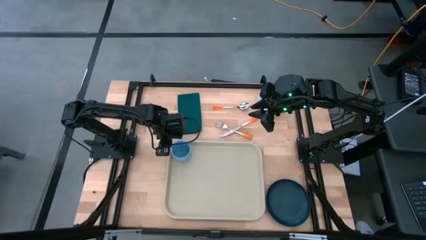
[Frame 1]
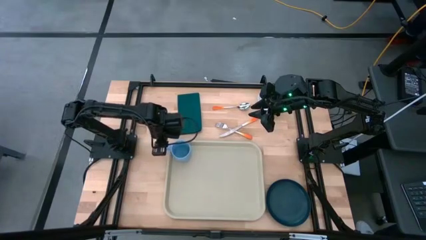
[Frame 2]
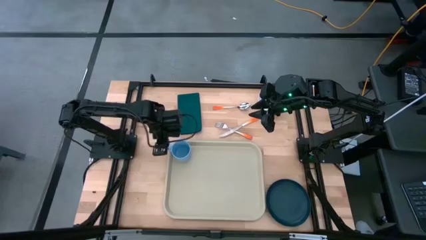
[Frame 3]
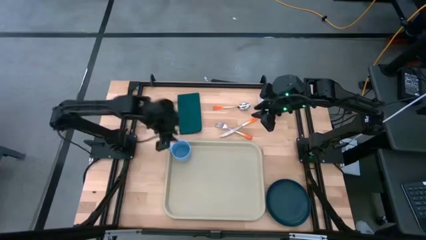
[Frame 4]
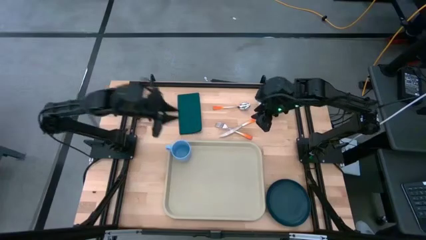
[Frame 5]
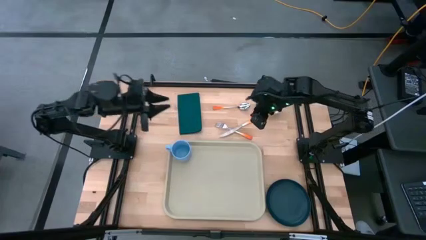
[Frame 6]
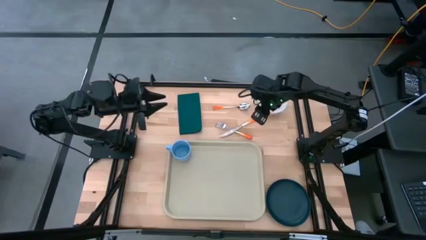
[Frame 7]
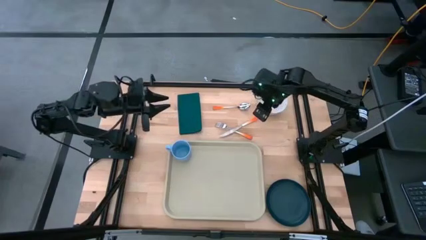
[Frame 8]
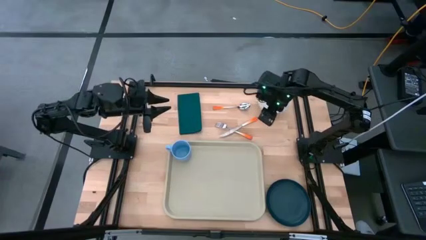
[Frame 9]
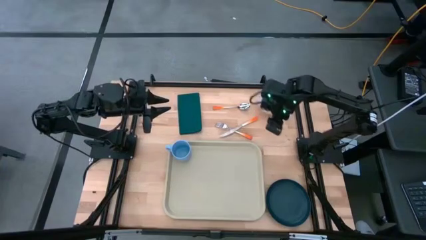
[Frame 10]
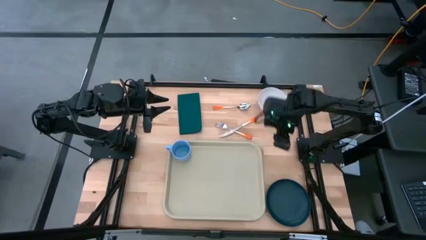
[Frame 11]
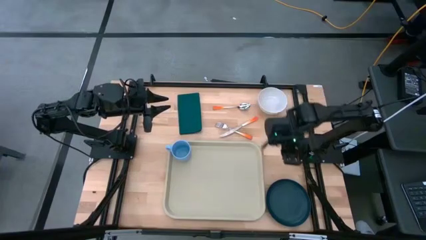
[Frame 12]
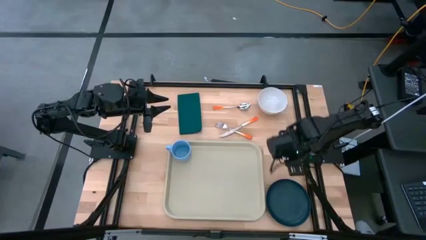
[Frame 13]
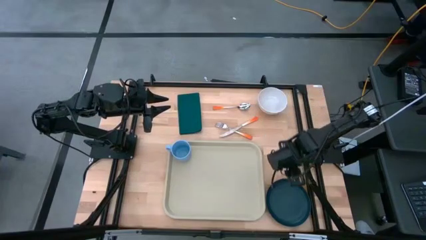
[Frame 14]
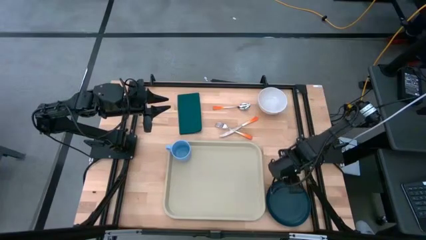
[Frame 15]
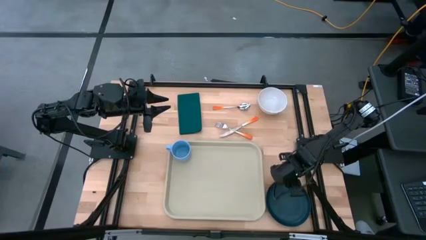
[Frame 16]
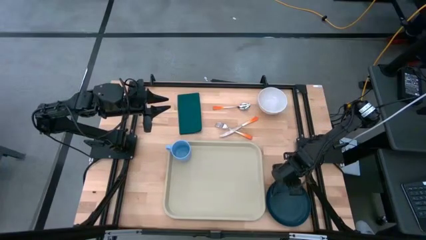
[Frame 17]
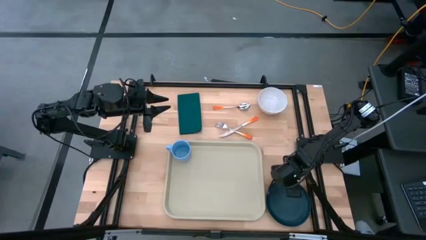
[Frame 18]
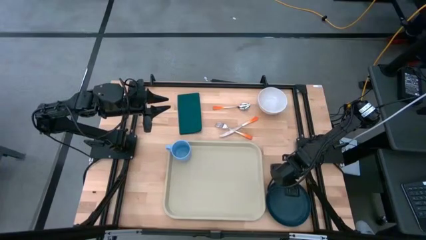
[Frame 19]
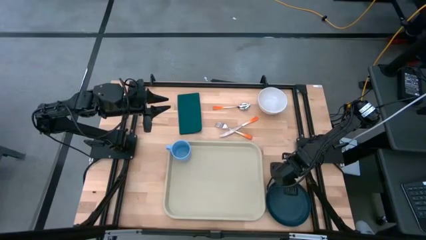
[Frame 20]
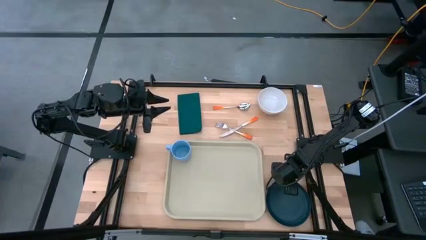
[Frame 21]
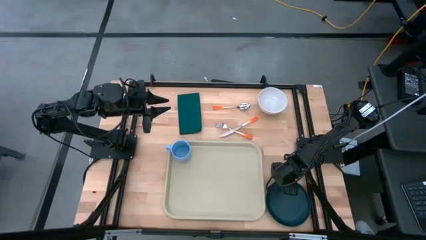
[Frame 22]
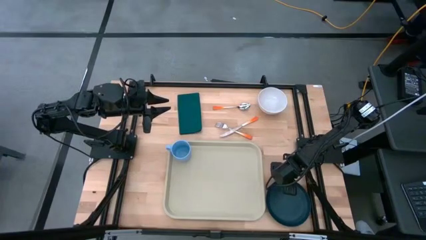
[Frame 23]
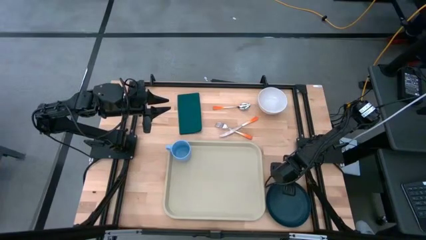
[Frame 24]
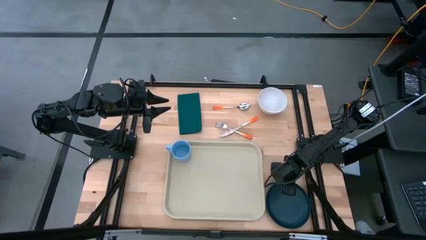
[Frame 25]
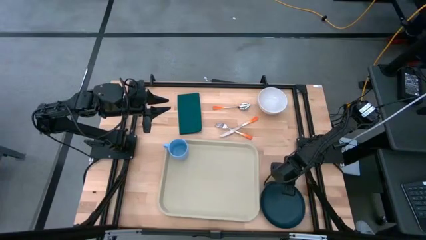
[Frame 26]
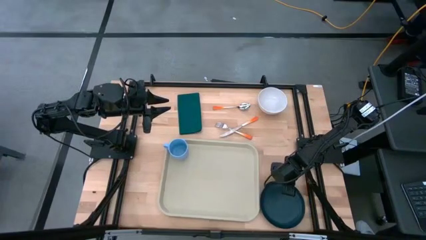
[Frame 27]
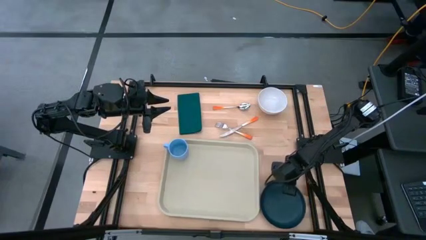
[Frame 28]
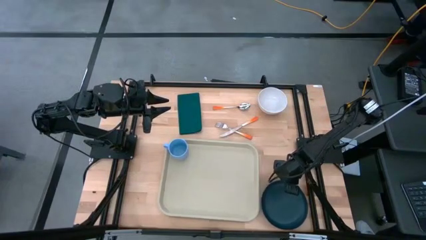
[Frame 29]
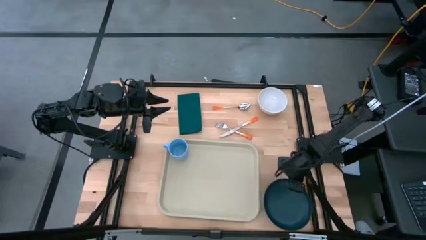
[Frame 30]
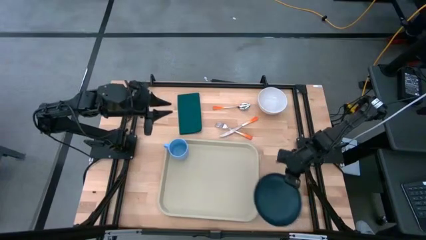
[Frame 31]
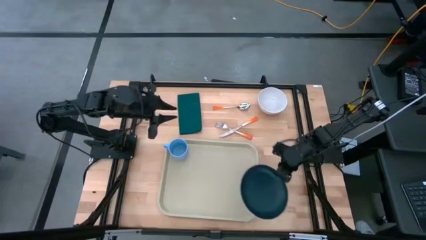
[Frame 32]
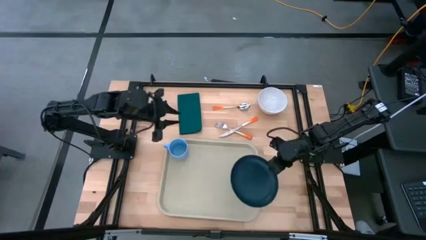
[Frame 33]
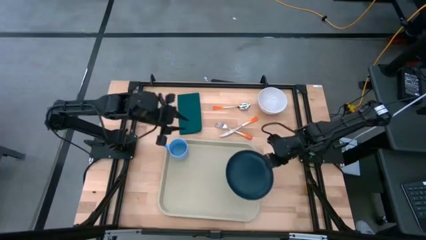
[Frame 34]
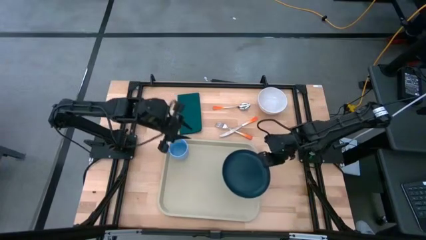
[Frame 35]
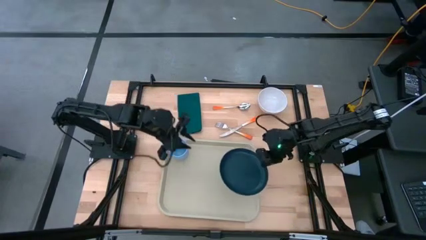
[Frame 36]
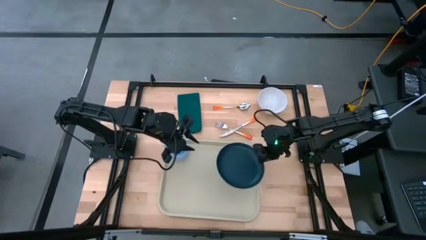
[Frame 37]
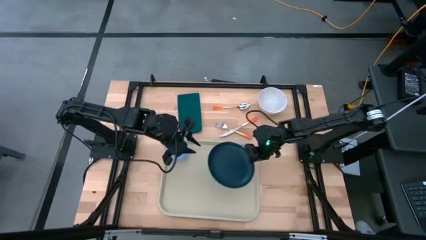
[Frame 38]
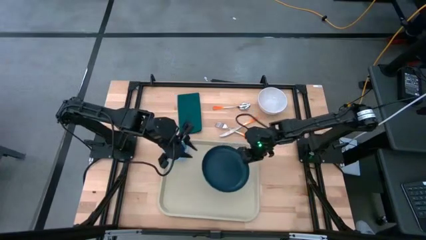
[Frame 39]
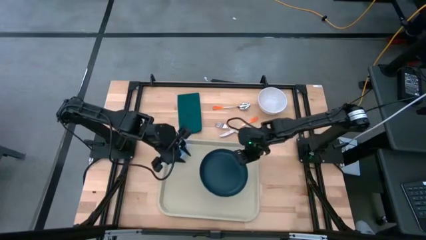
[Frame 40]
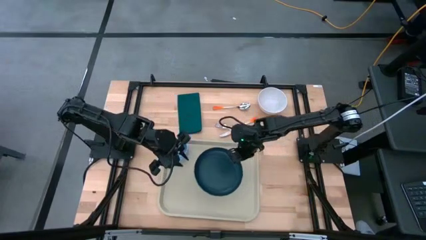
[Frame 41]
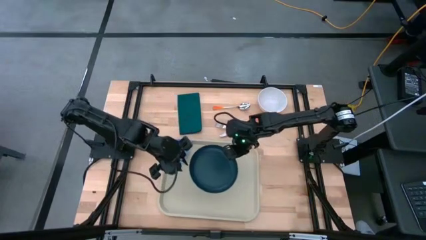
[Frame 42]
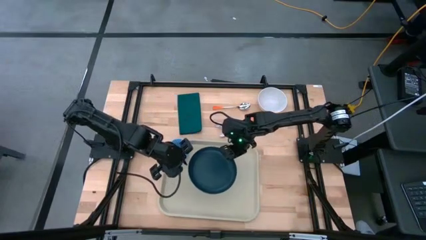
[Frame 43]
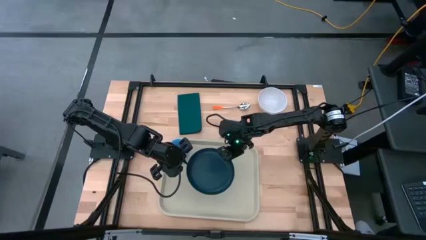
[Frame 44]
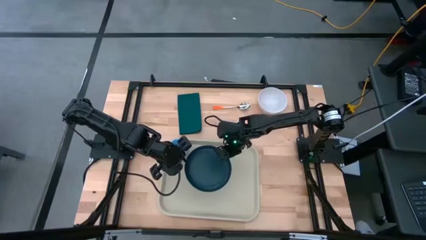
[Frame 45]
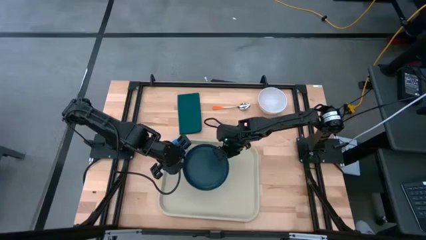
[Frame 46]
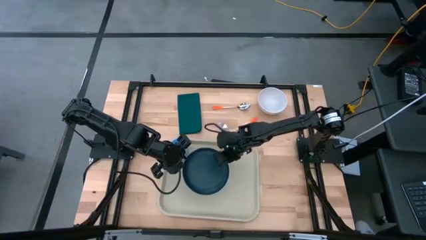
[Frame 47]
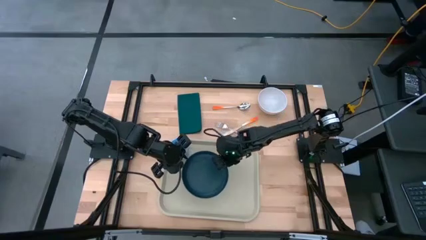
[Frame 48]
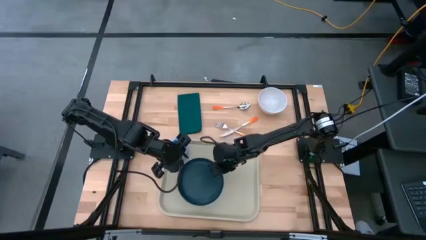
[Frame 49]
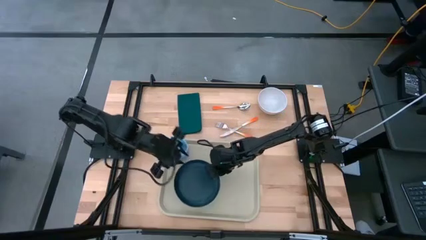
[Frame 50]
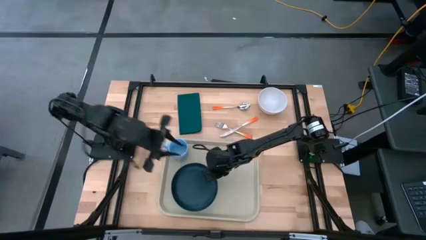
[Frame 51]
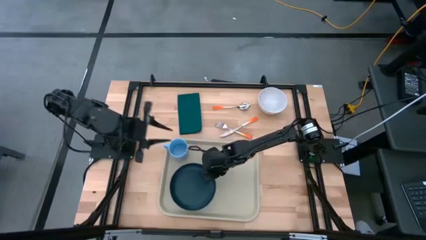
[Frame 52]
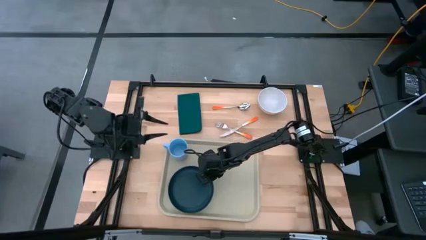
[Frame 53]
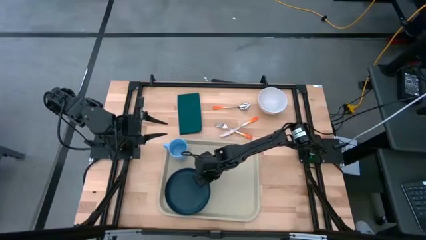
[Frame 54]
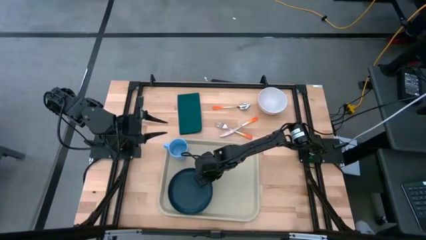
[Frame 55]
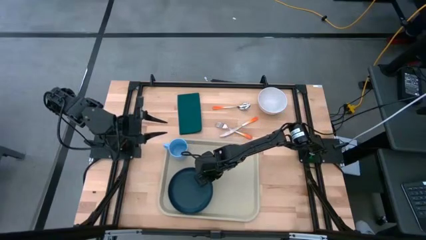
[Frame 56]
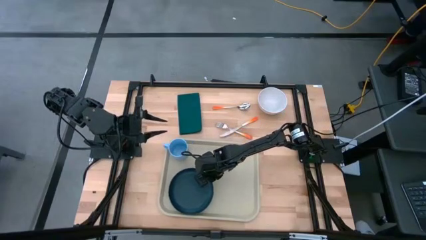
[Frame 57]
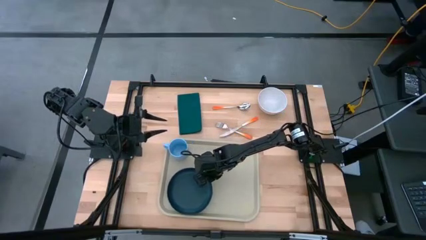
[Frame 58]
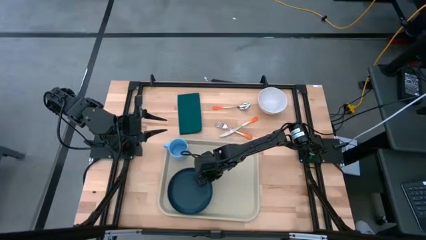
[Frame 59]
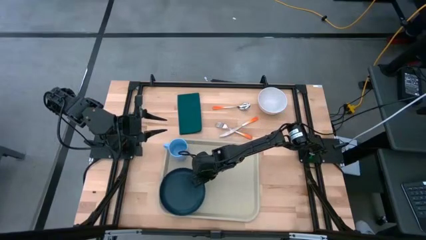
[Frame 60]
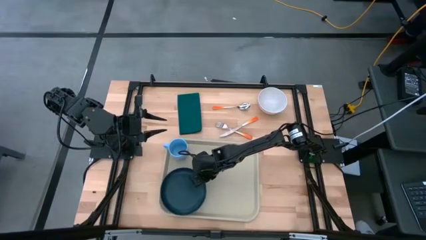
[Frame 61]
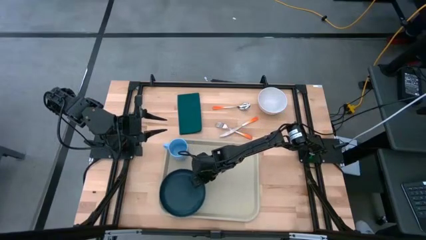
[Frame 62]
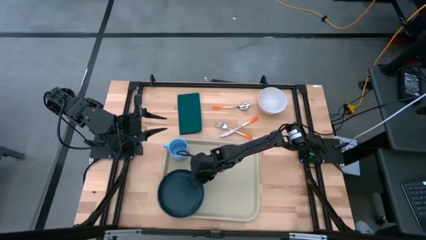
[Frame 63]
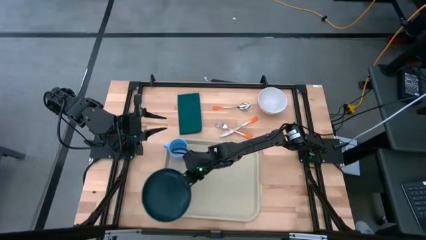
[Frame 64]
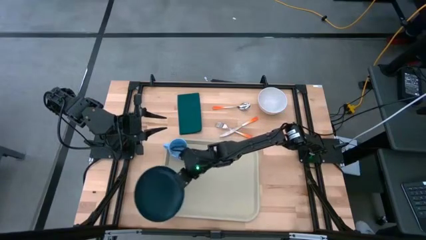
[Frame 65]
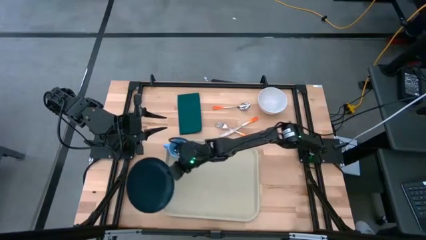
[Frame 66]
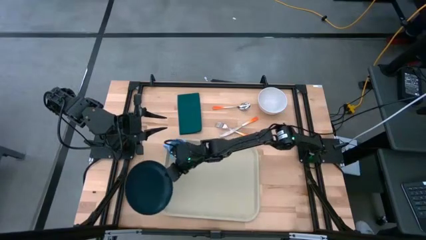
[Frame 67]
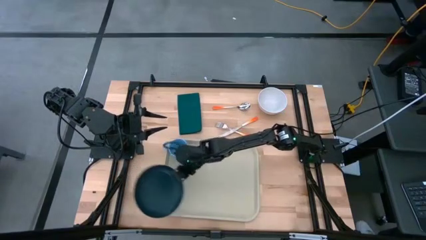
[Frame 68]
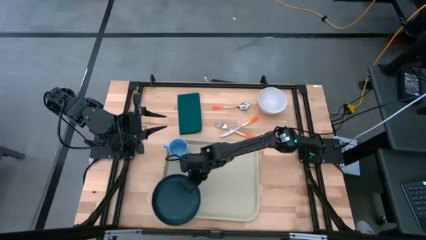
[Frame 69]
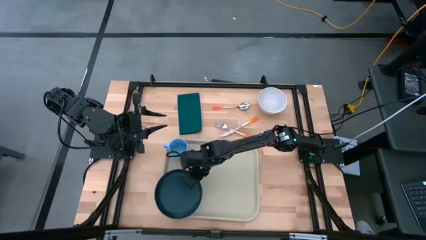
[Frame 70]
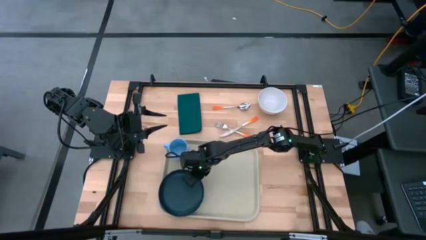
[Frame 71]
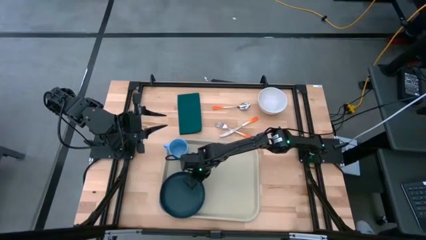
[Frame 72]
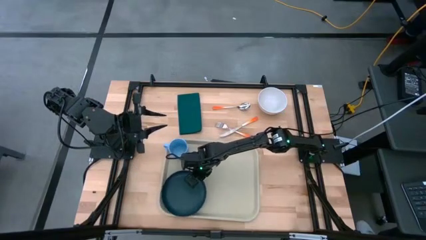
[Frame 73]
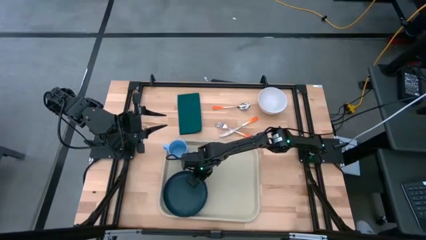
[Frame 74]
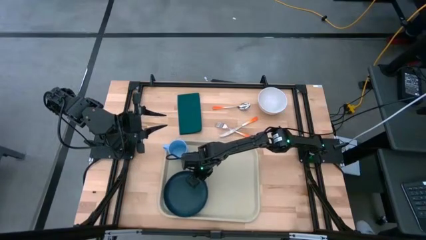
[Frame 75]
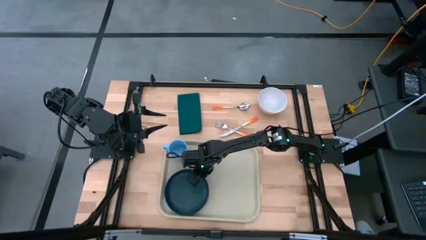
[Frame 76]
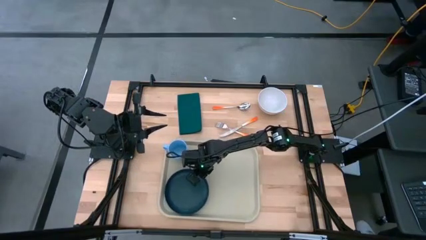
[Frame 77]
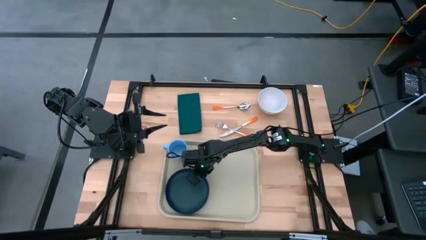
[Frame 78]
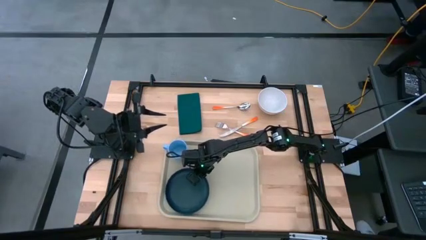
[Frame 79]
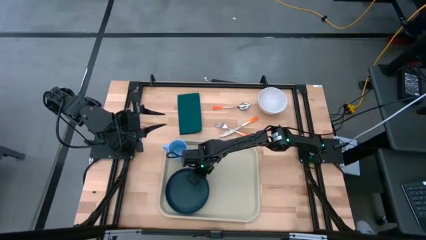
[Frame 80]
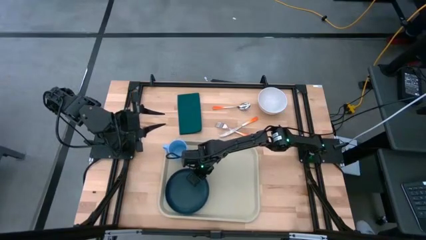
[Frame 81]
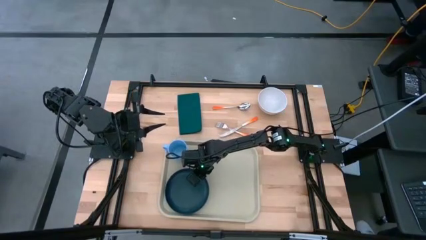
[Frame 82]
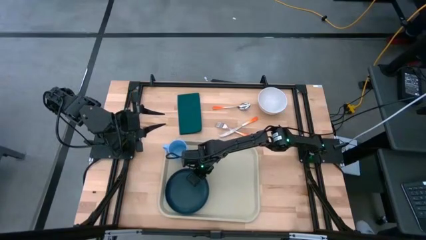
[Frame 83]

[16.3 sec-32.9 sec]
Task: Set up tray
Put the green plate on the gray tray below the blue mug
